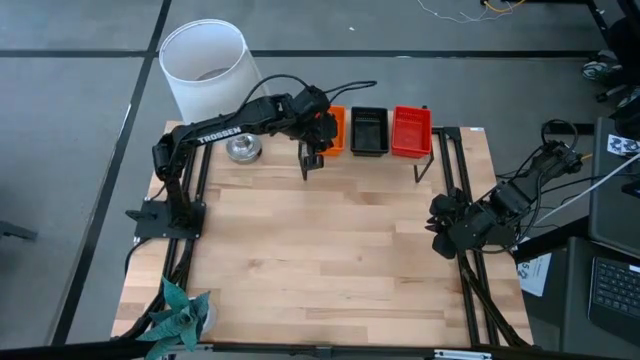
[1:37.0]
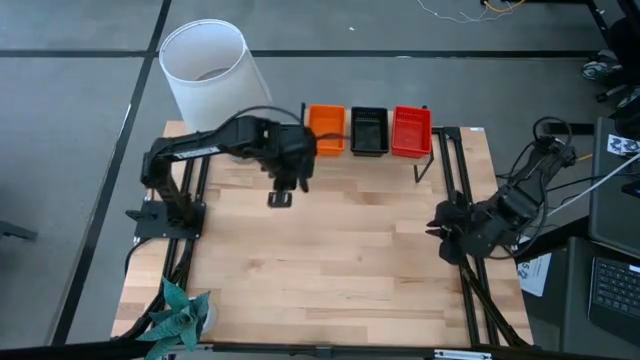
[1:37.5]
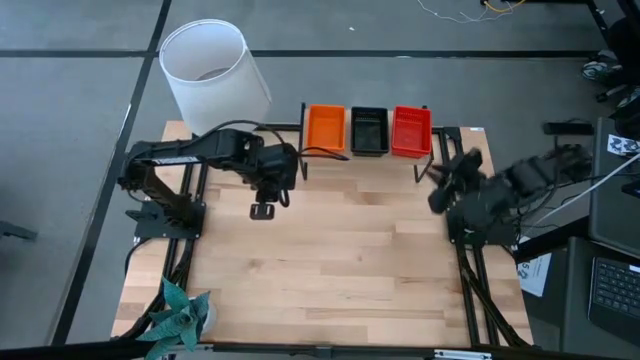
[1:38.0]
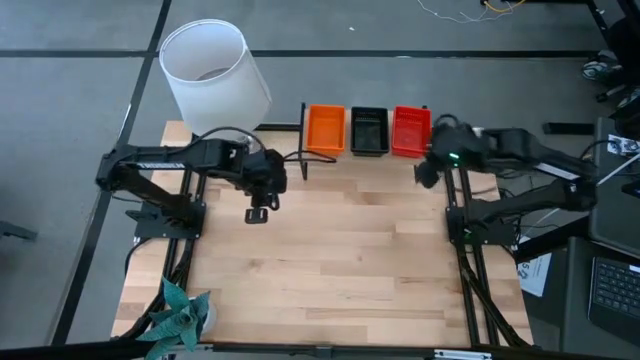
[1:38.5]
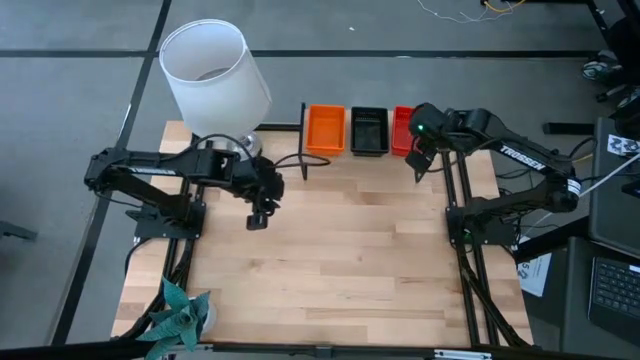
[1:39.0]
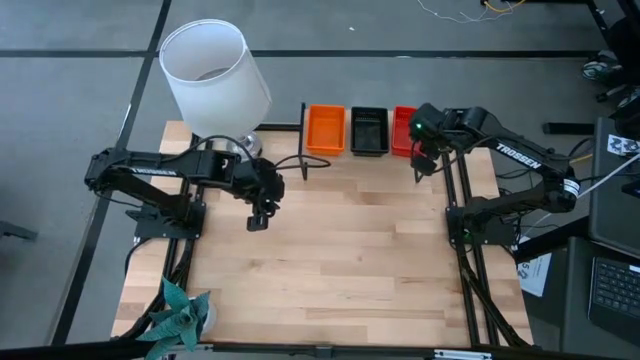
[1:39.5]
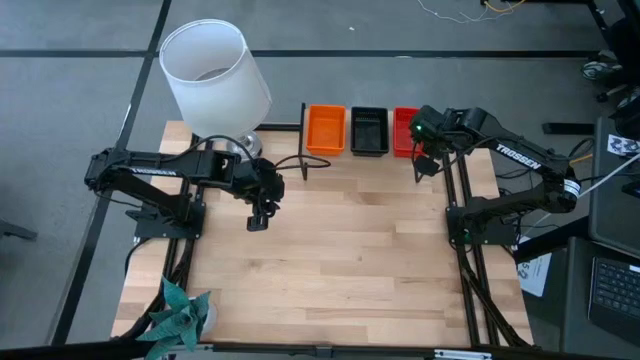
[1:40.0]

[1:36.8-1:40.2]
Task: Stack baskets on shelf by color
Adjust the stacked red bins on the shelf

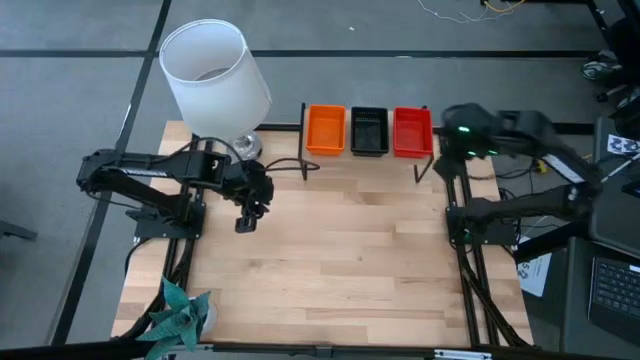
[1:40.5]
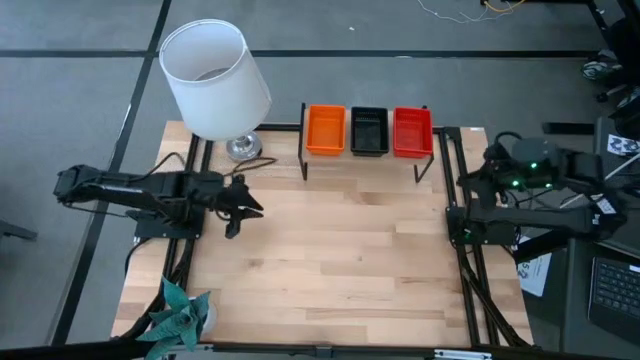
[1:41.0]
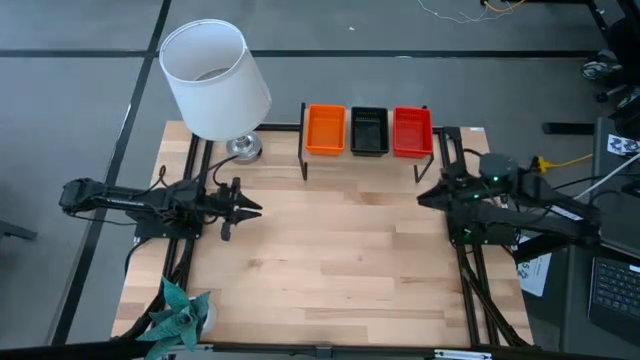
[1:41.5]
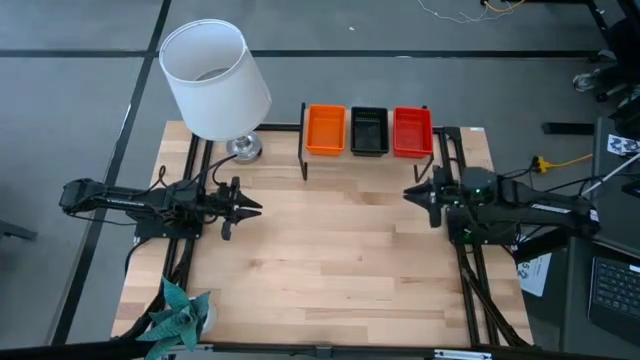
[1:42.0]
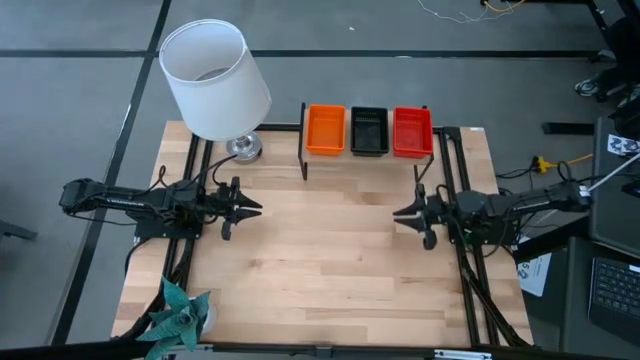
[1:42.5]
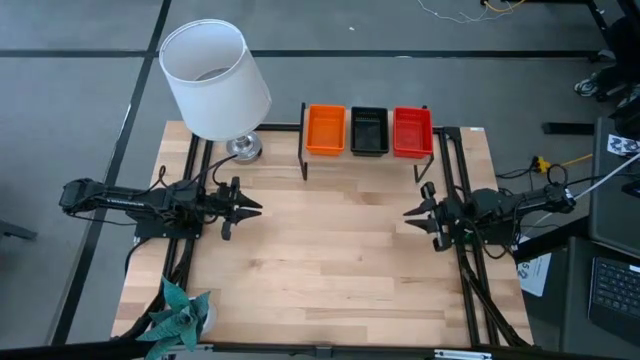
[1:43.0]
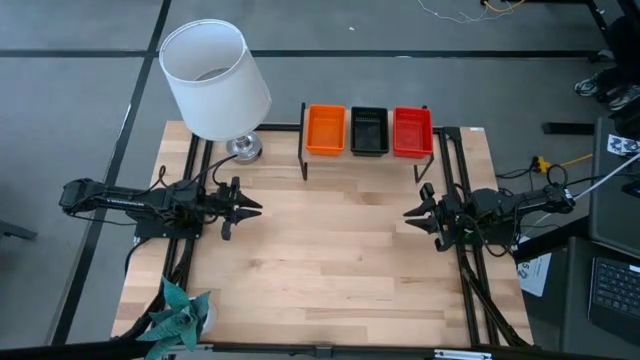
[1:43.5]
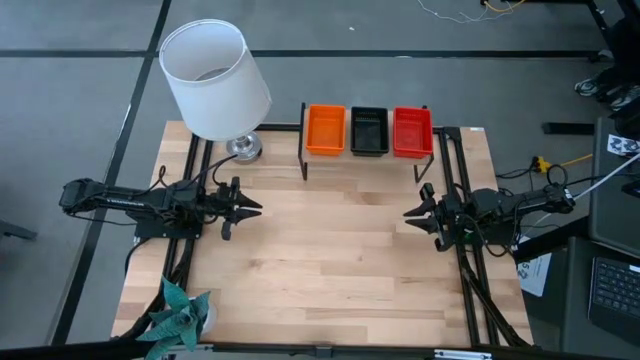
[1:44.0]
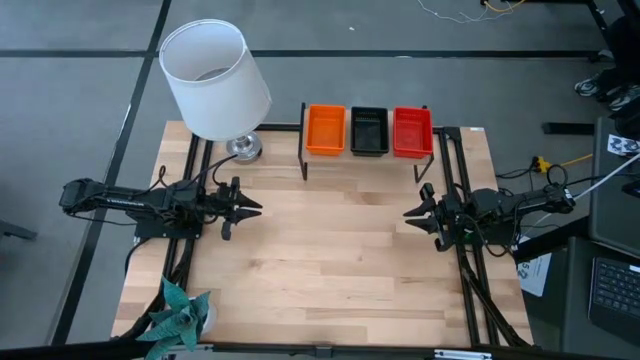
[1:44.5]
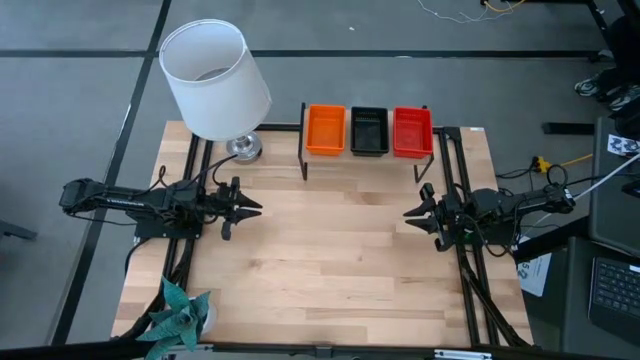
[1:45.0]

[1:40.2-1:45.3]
Return to Home Position

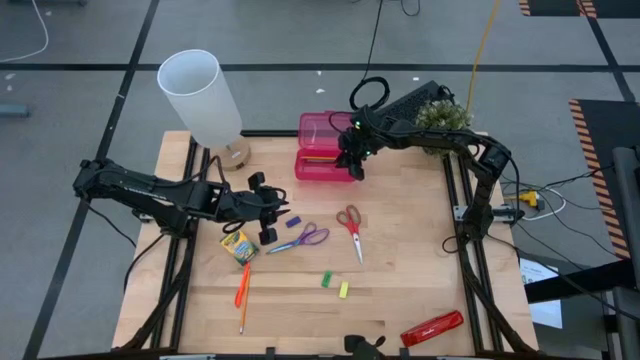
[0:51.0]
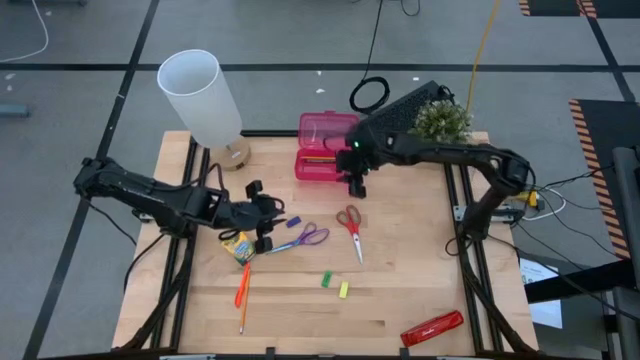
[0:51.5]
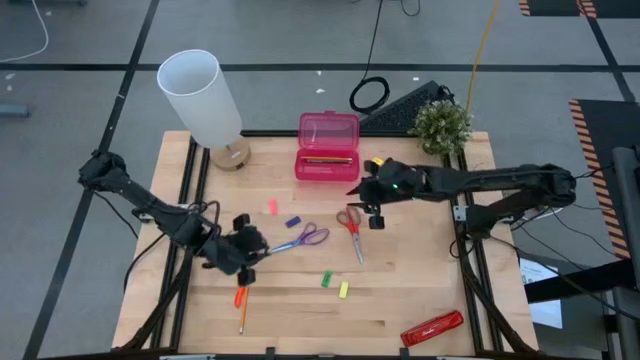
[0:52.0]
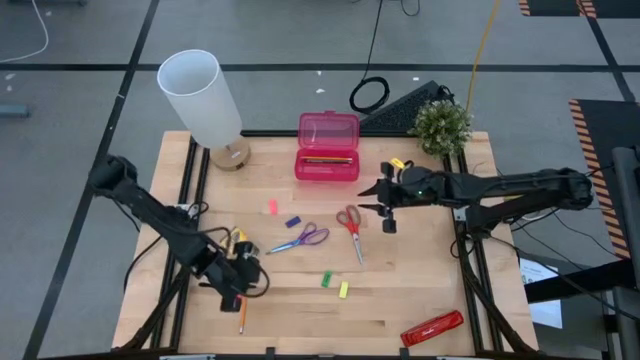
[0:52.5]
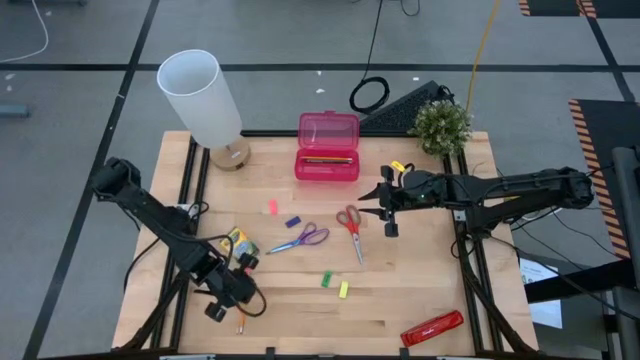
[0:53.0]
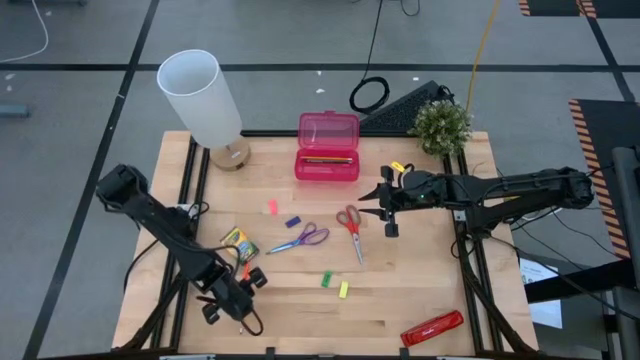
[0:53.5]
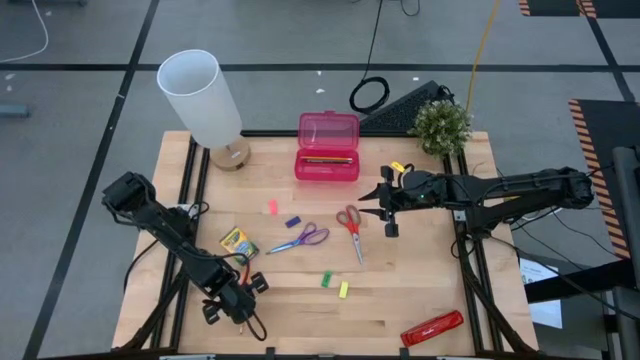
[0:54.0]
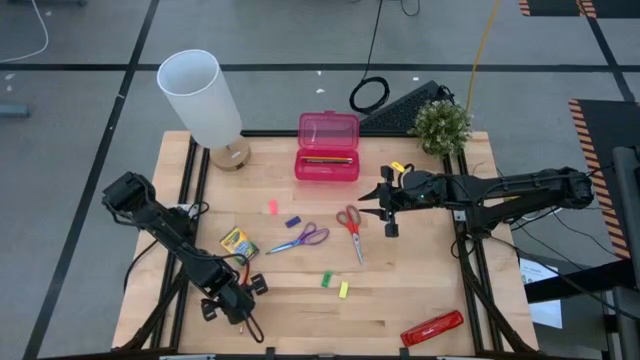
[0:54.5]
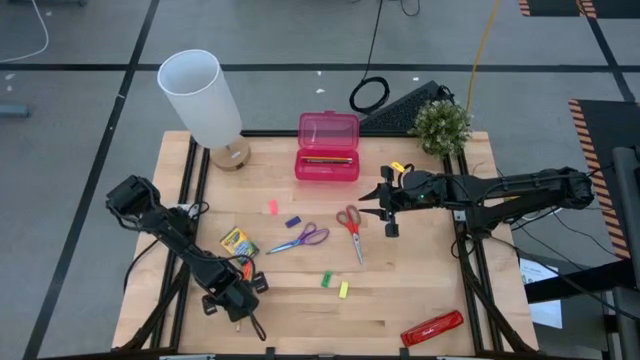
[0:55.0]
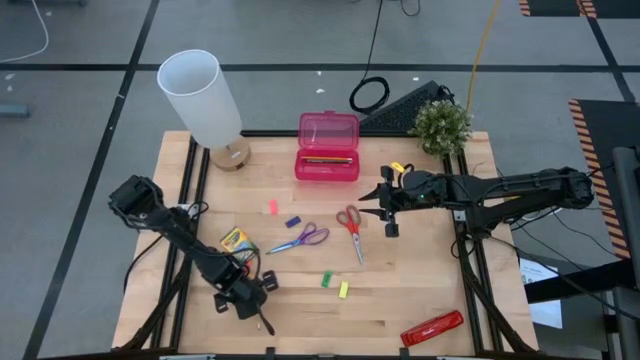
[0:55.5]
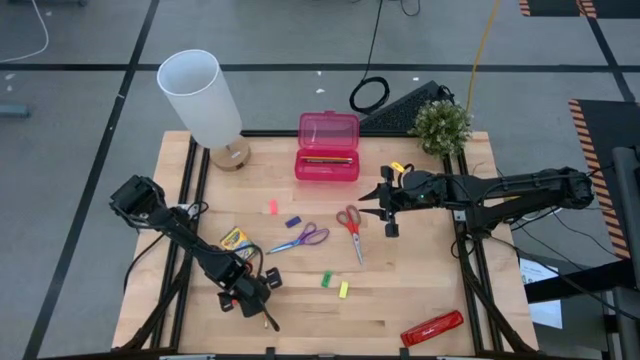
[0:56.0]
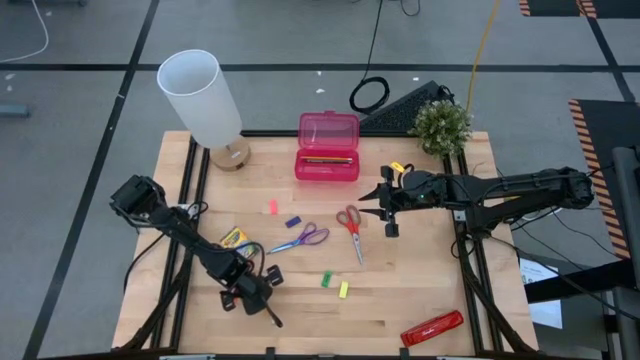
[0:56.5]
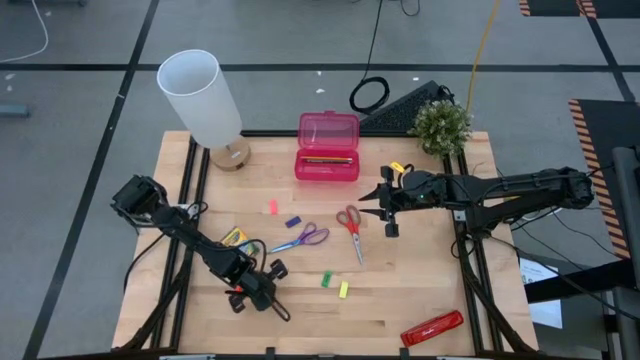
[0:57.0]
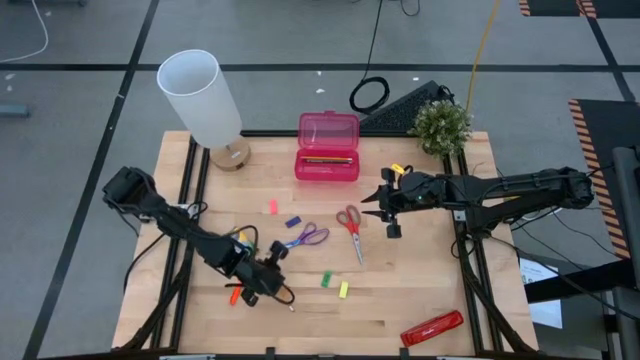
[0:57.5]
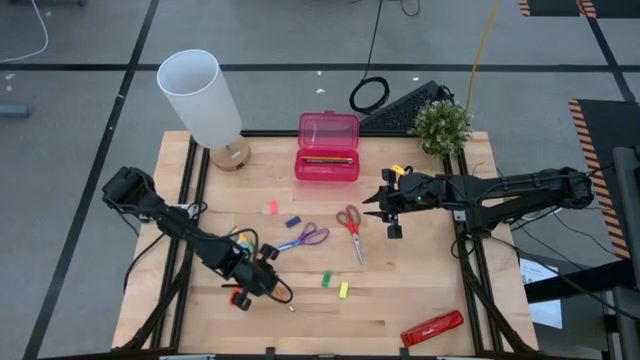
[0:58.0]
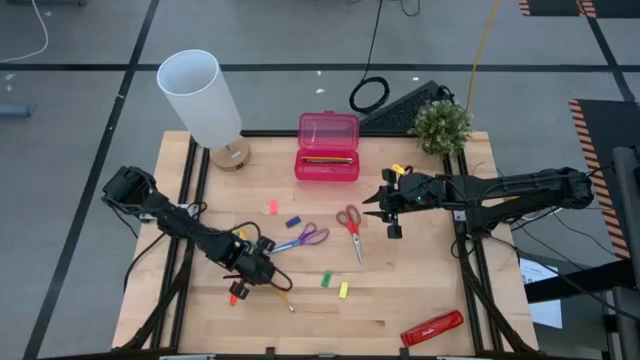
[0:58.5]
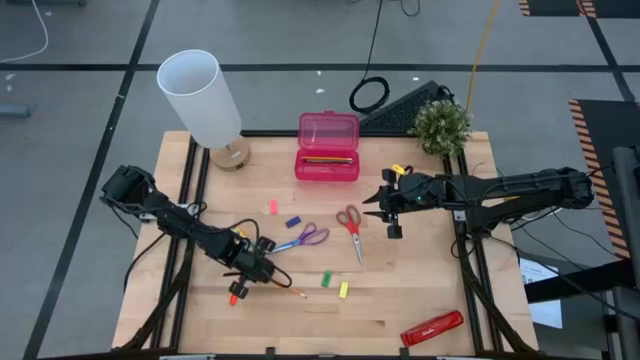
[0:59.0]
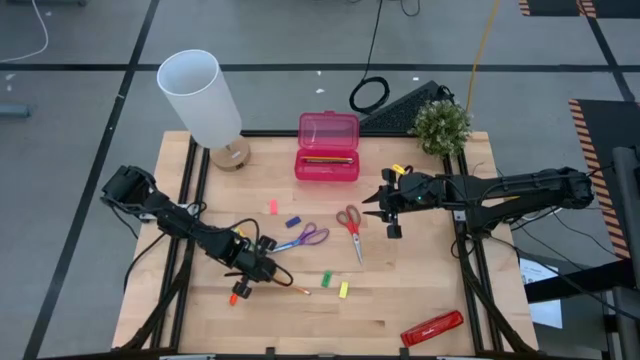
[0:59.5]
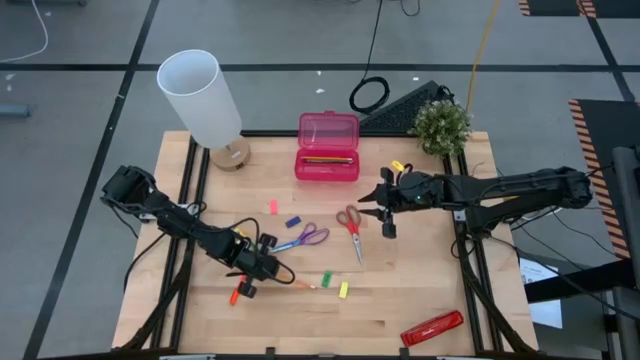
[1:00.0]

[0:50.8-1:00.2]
Task: Pack school essentials
Put the yellow pencil into the red supply box
